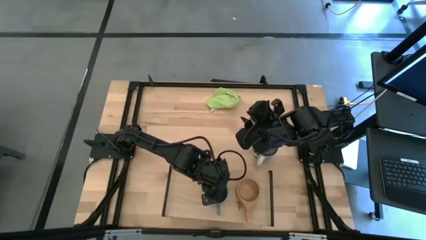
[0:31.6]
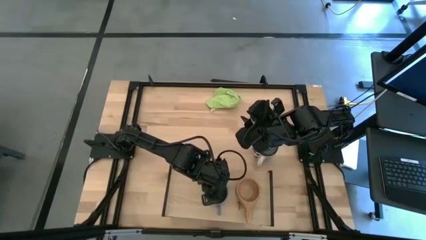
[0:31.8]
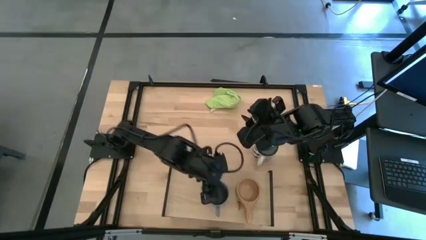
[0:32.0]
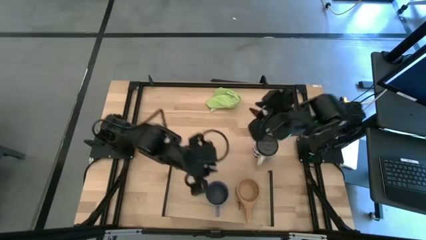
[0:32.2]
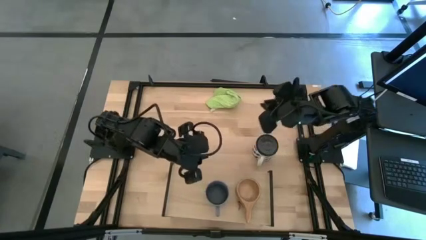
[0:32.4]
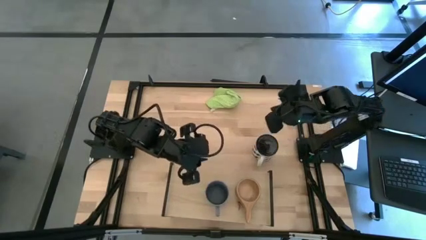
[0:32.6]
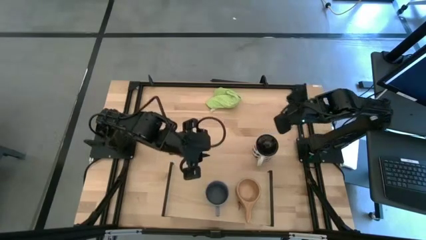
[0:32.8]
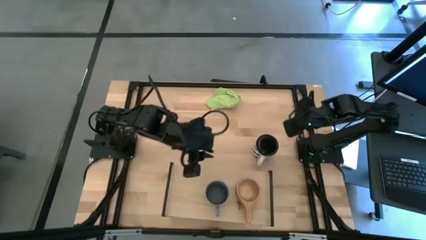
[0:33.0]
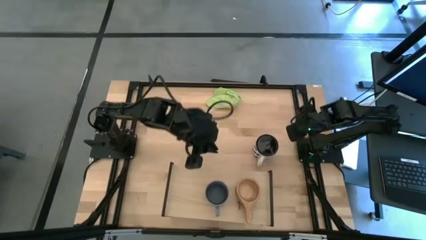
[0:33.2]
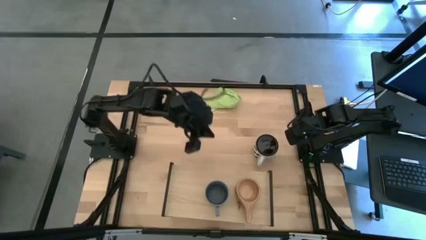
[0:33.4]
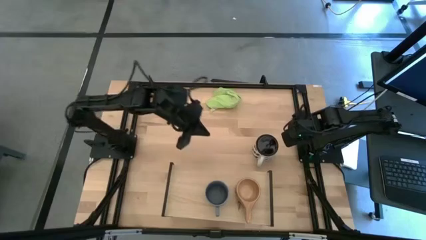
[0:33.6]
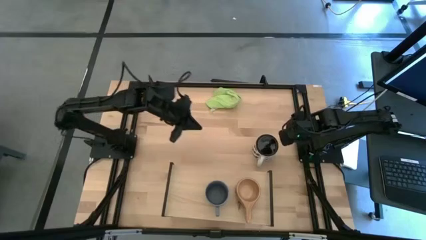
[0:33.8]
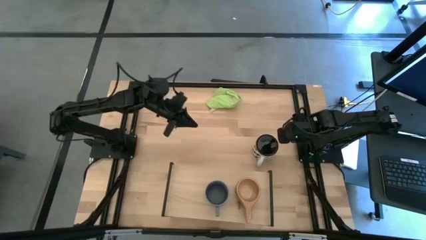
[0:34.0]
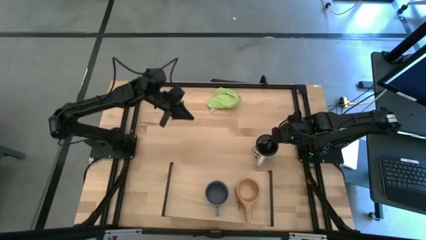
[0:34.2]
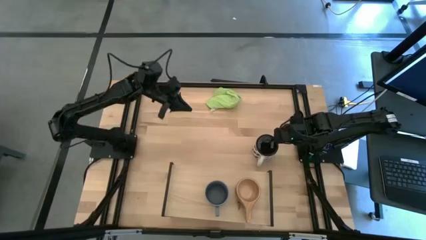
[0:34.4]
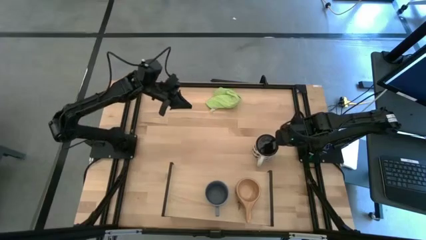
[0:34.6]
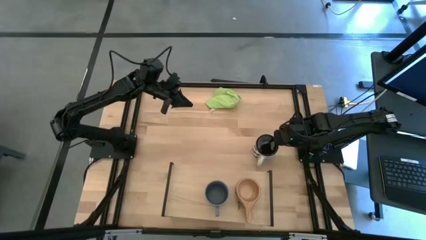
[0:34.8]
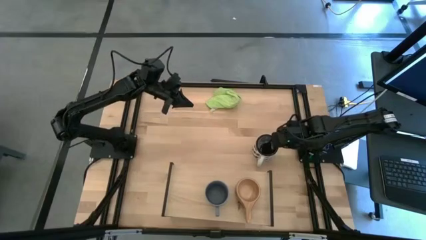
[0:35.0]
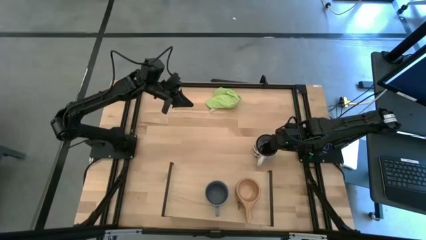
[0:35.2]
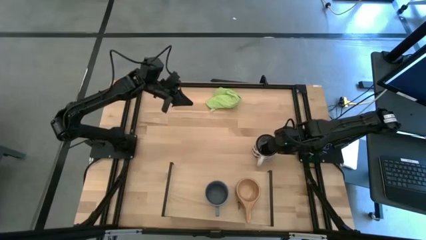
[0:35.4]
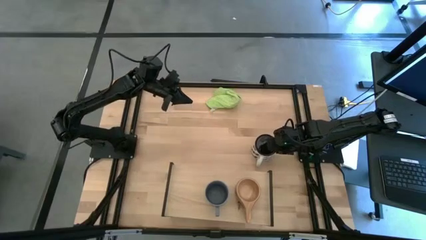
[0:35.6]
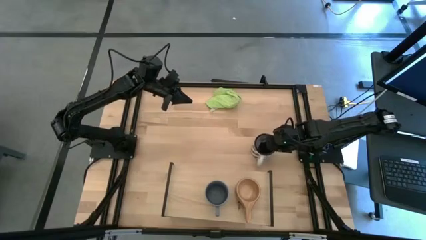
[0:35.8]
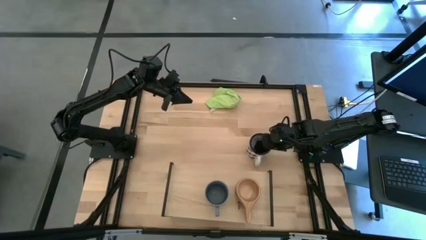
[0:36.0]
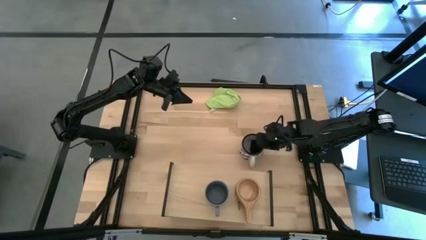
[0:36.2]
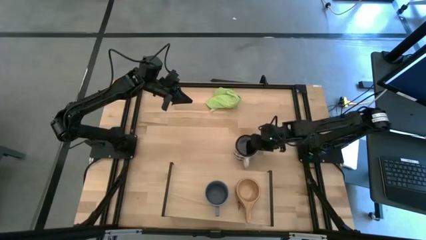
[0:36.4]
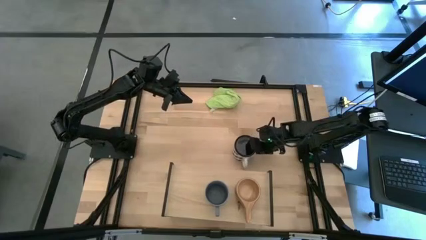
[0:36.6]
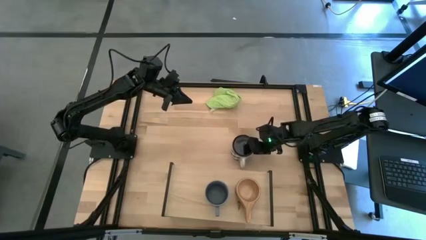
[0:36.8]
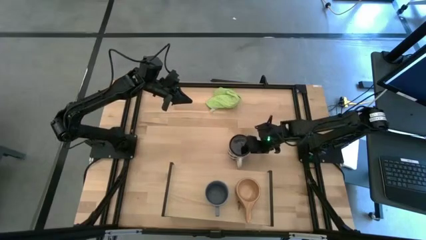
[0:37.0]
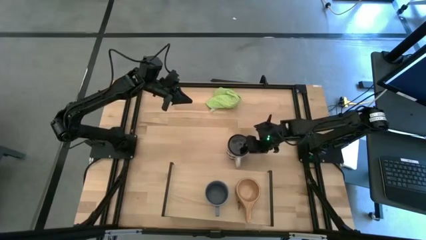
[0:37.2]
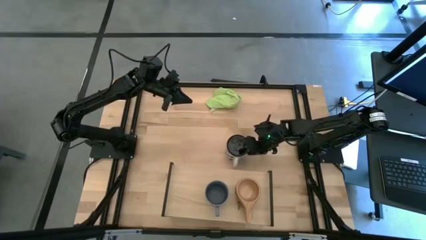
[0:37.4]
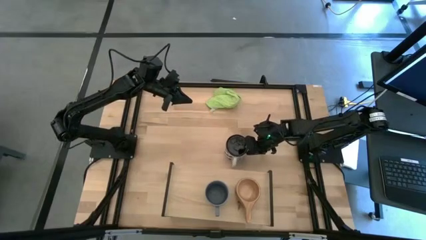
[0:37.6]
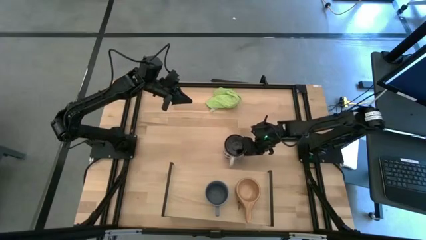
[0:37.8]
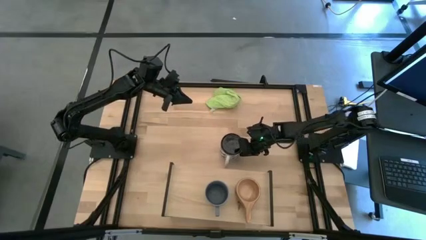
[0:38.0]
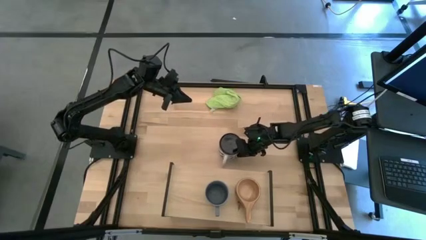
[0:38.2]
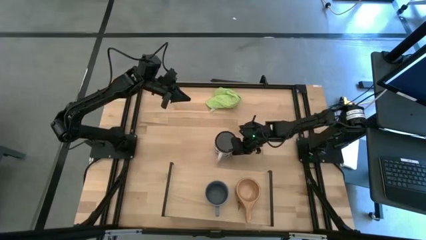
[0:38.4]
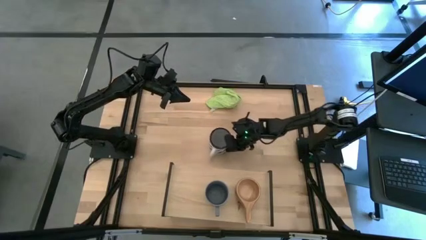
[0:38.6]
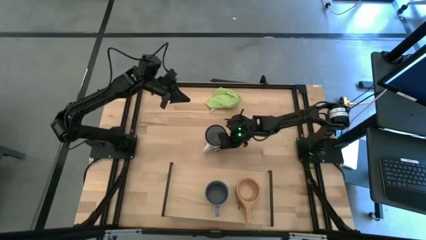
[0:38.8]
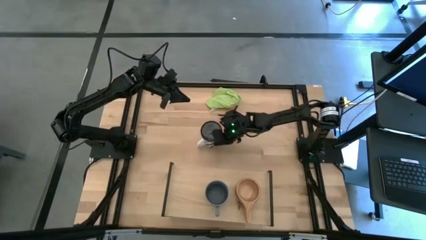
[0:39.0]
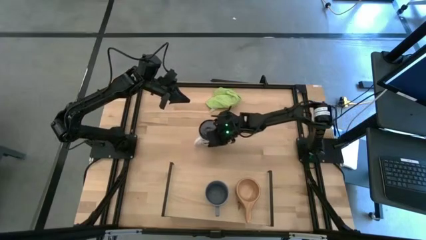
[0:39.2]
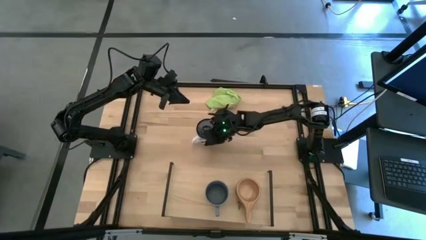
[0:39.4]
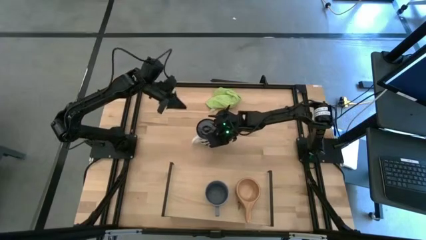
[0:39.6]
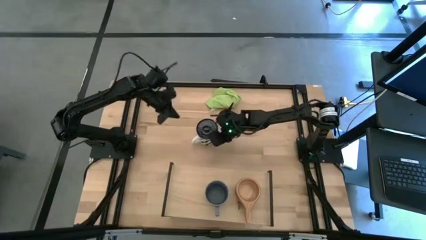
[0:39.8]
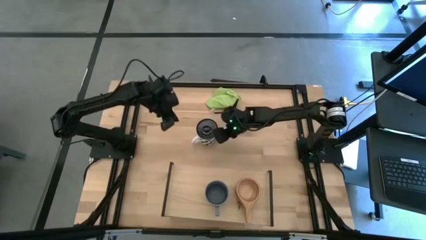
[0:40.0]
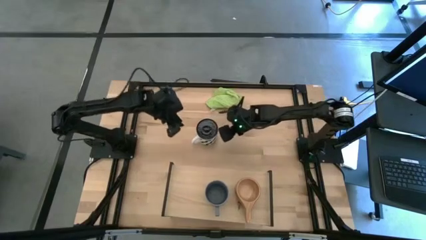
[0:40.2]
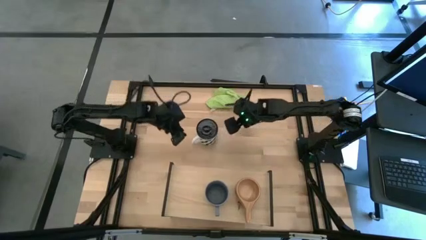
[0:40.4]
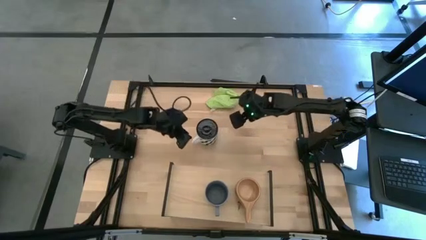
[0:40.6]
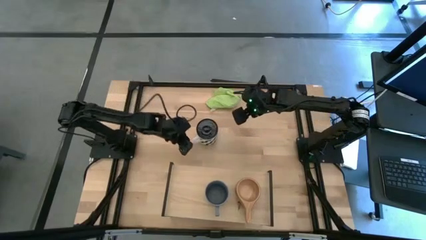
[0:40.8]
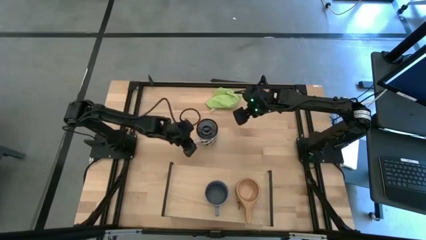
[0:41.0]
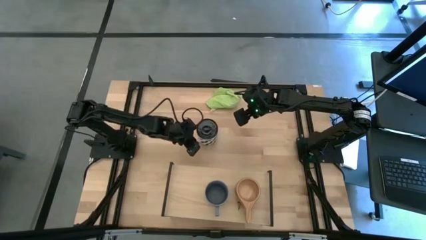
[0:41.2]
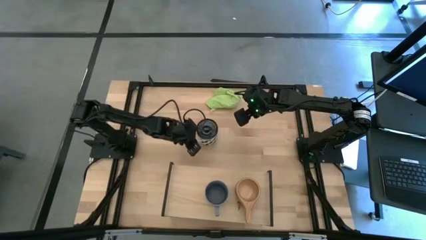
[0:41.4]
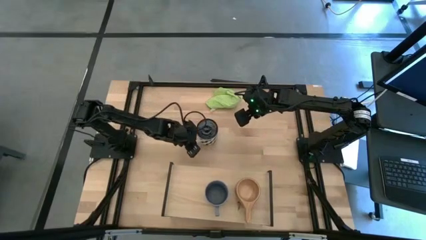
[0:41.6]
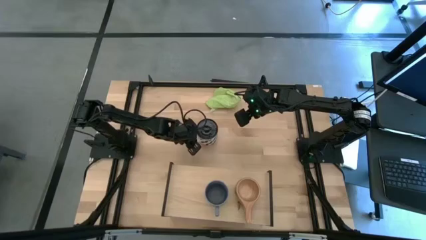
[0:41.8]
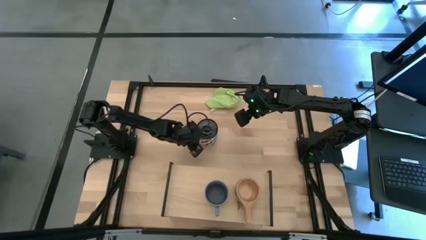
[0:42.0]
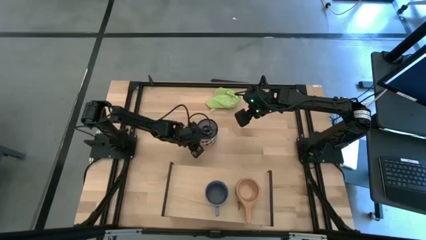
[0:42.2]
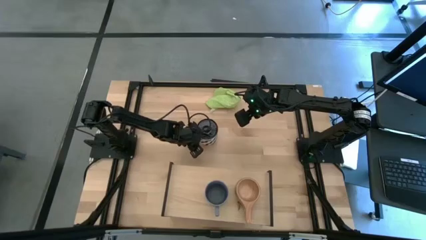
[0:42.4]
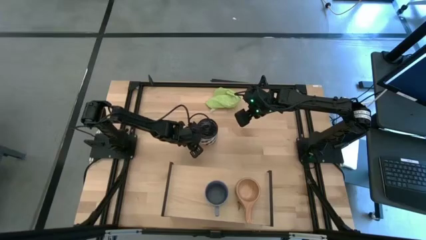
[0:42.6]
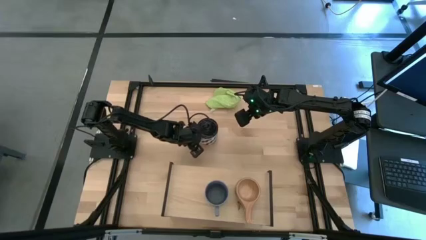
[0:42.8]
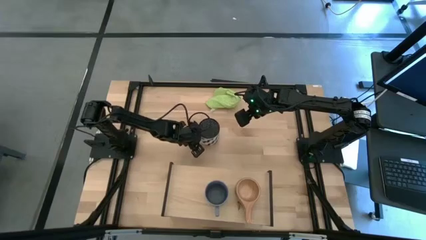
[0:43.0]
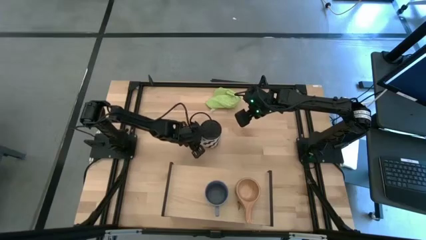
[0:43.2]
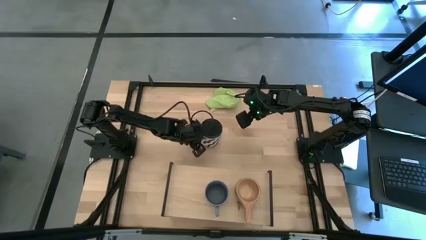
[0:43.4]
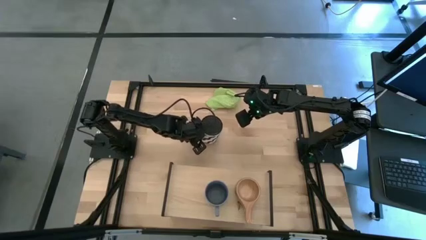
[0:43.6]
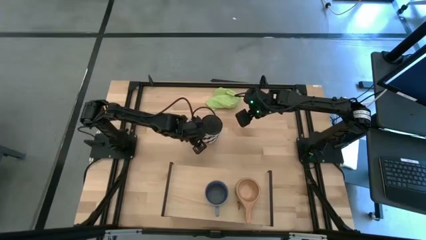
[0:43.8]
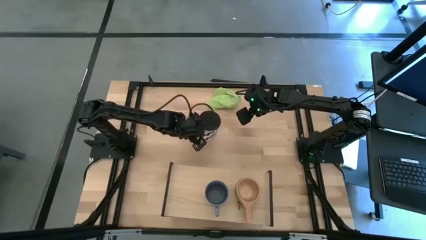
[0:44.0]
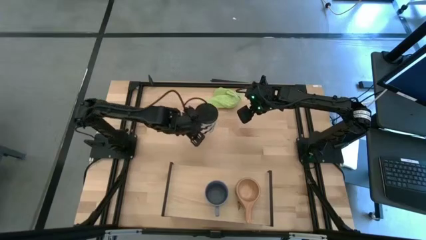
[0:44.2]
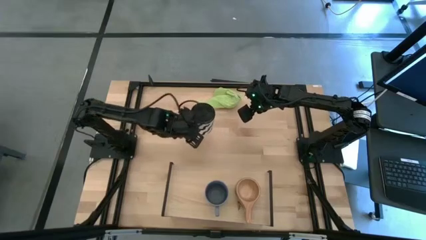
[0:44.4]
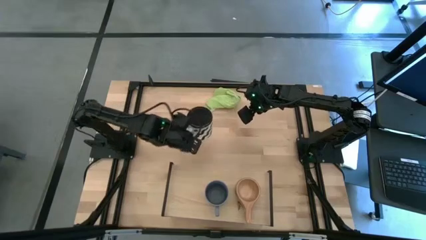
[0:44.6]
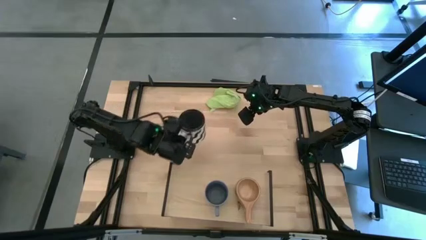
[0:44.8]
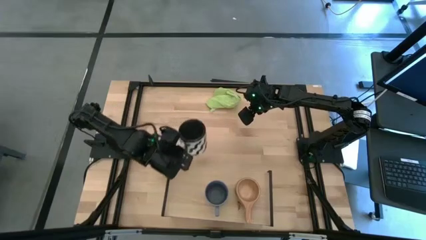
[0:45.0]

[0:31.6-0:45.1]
Task: Stack small to large cups/mugs on shelf
Put the white mug on the shelf
